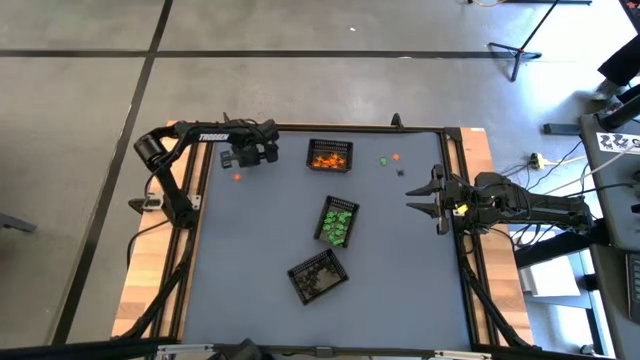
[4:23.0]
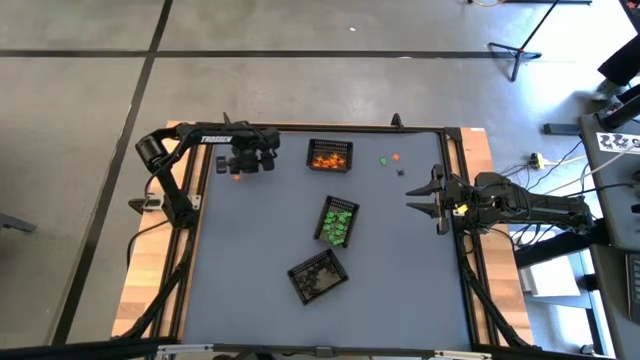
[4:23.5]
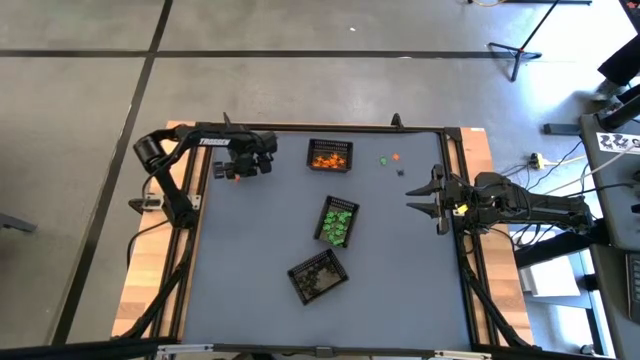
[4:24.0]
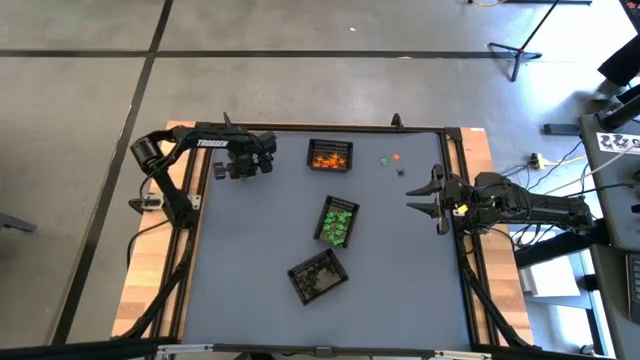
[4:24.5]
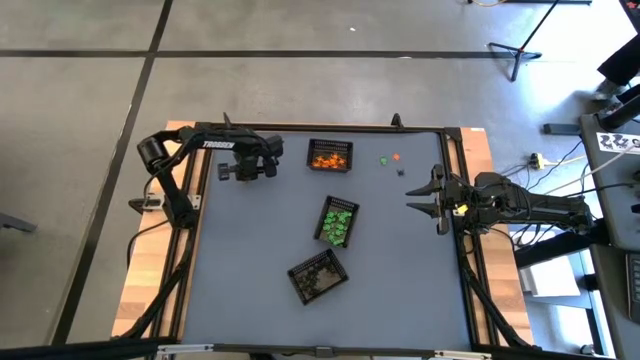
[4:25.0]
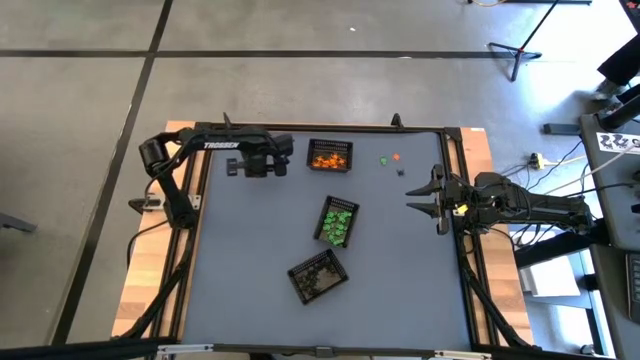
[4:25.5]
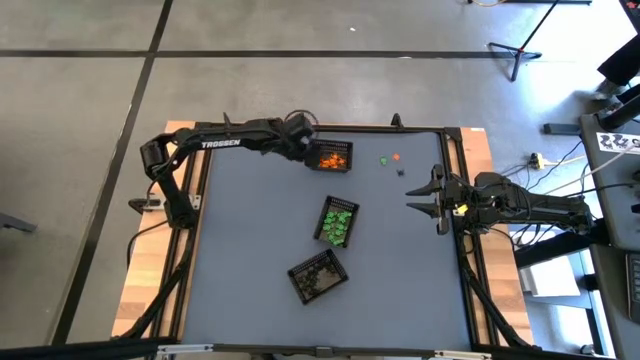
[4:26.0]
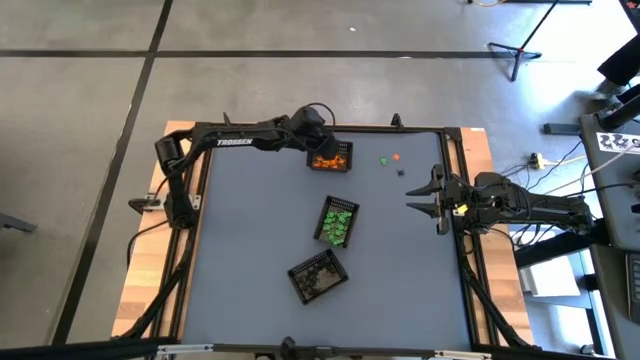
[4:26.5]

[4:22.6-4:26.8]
Task: Sort Halloween decoration
Put the orange spider toy into the top black bin

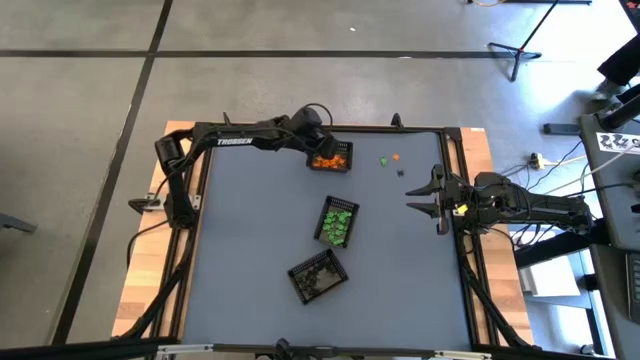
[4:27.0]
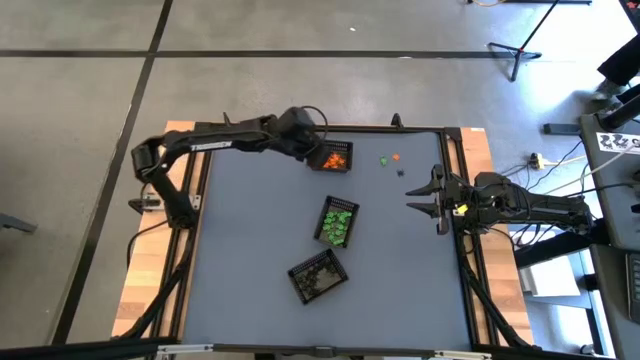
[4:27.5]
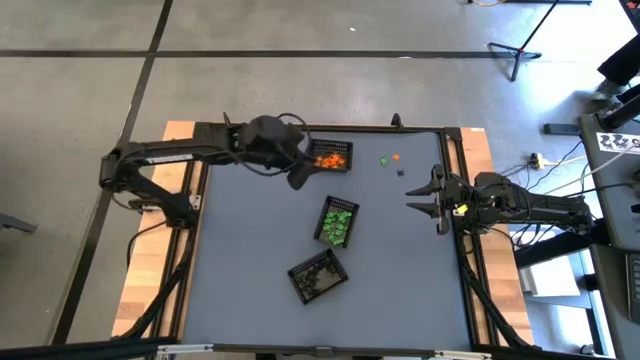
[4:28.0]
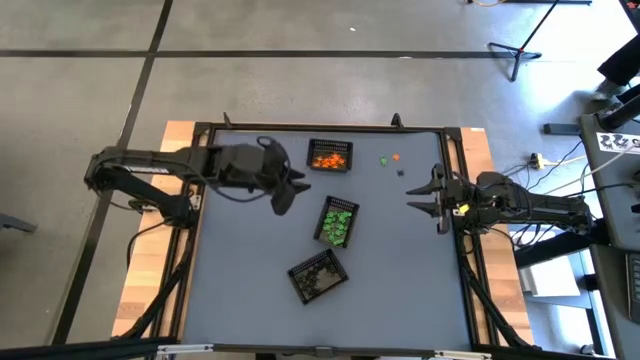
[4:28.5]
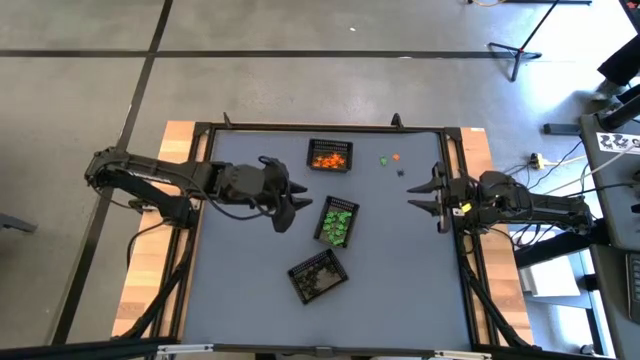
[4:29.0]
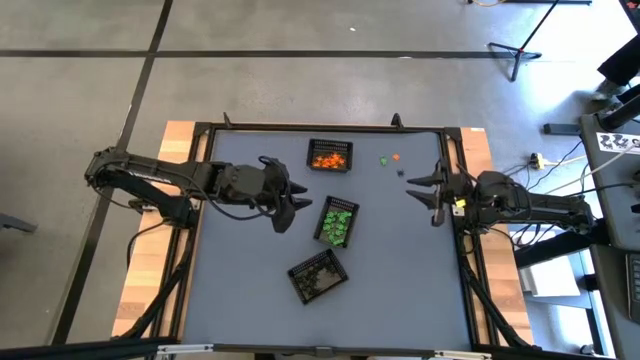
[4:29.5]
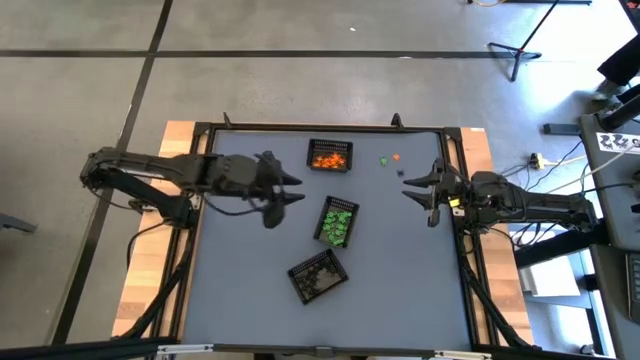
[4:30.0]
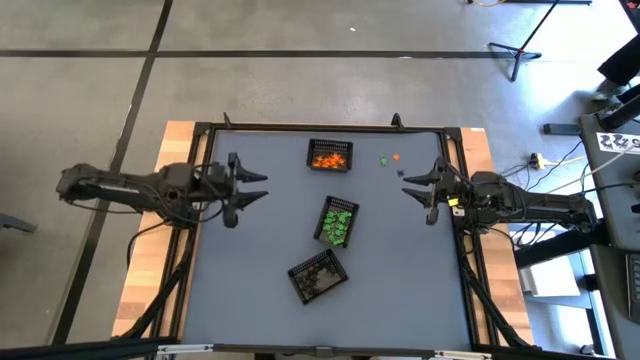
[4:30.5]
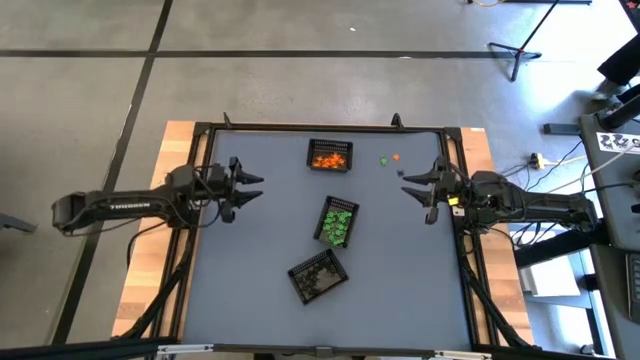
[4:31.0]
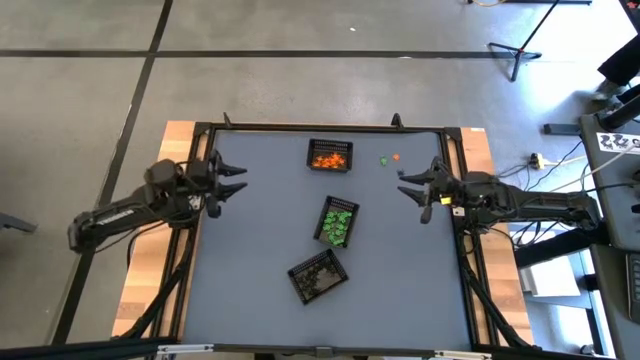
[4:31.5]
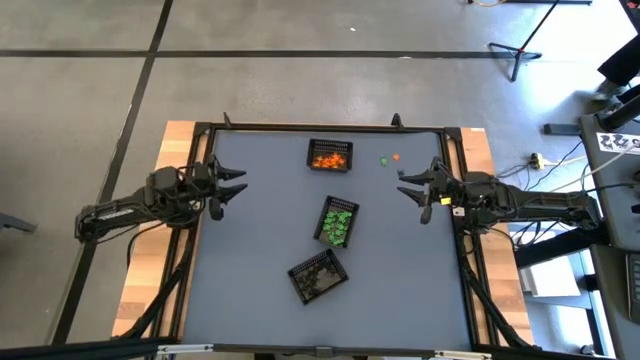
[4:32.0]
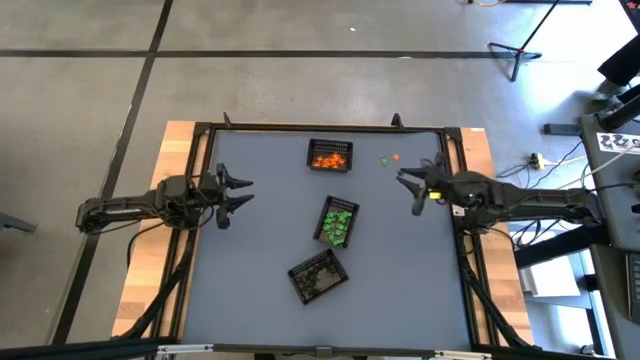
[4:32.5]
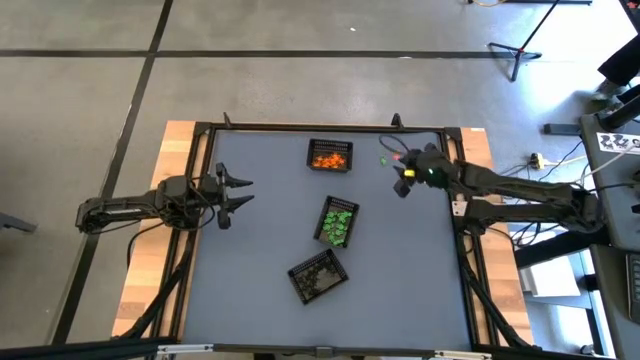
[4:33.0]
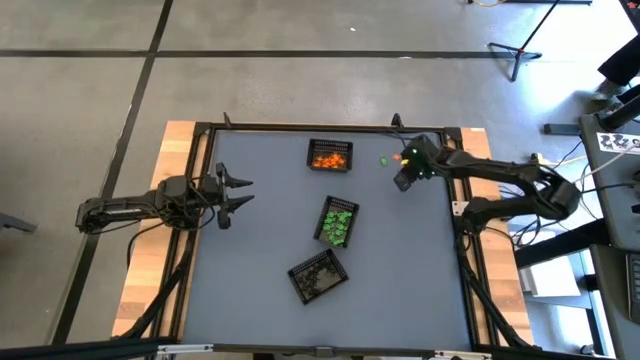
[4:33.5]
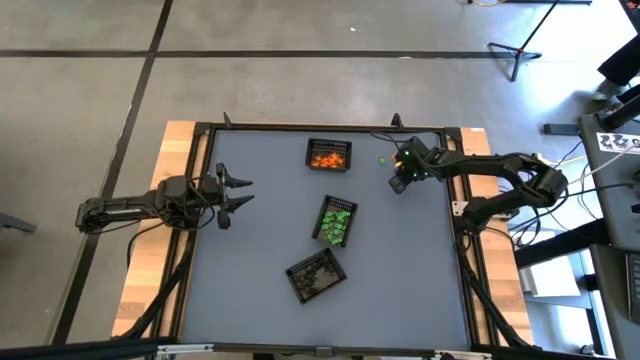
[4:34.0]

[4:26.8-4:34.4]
Put the black spider toy into the bottom black bin

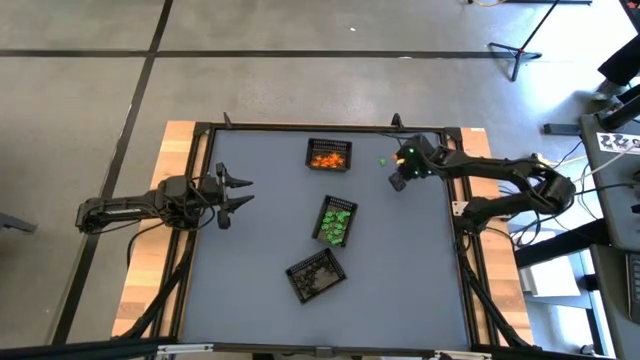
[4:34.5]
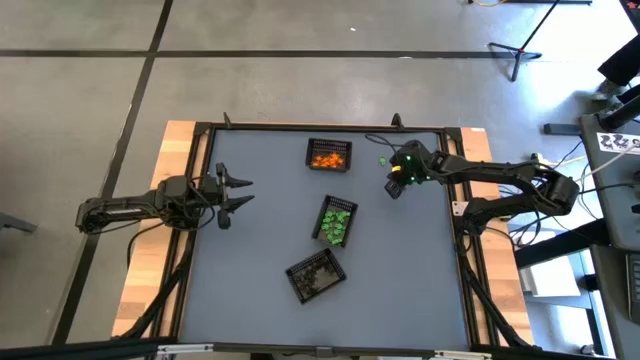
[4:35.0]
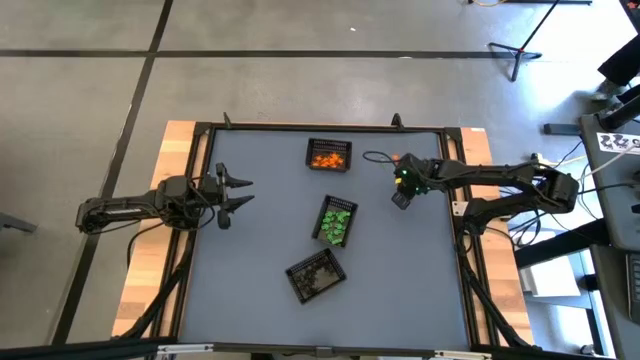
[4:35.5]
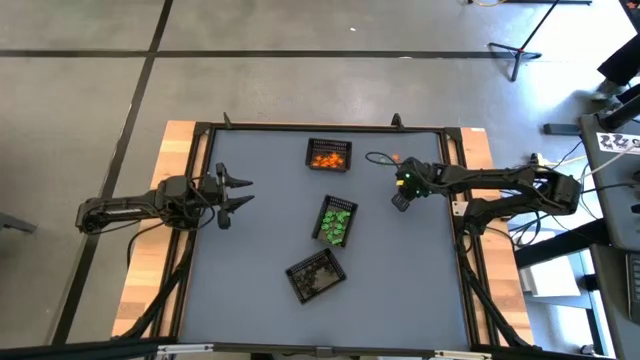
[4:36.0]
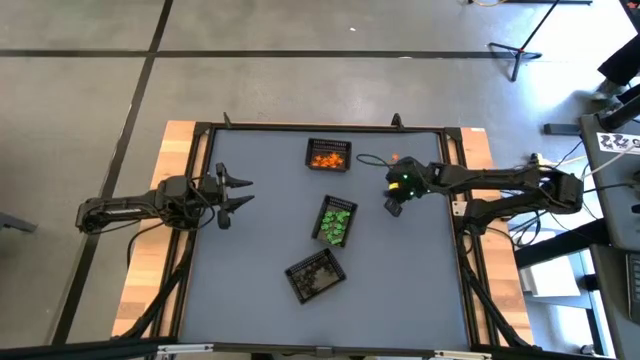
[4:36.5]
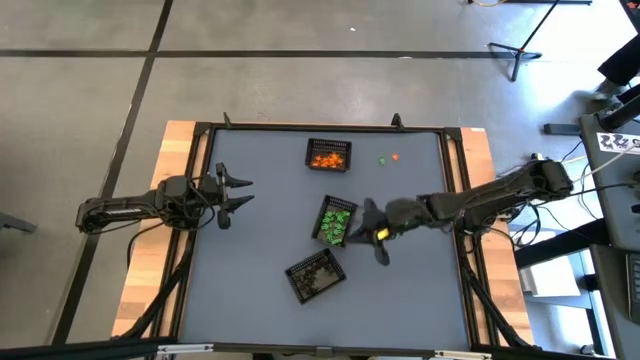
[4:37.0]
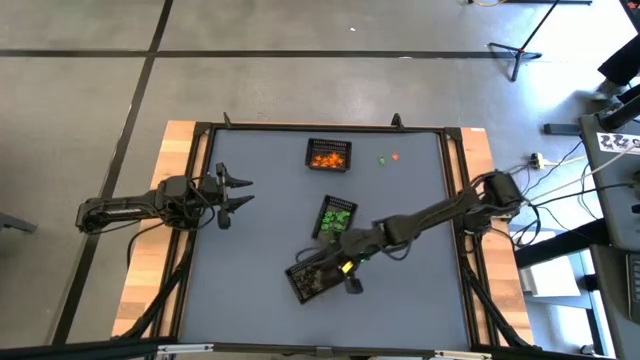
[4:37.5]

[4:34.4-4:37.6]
Put the black spider toy into the bottom black bin

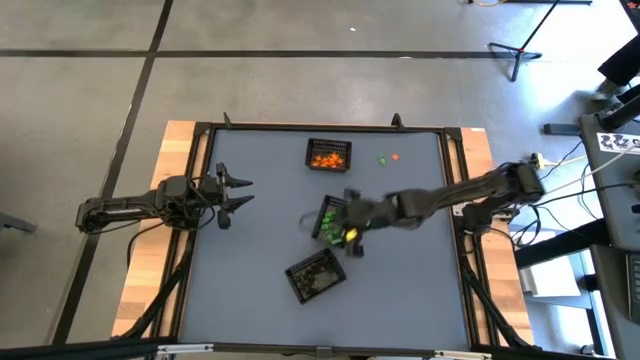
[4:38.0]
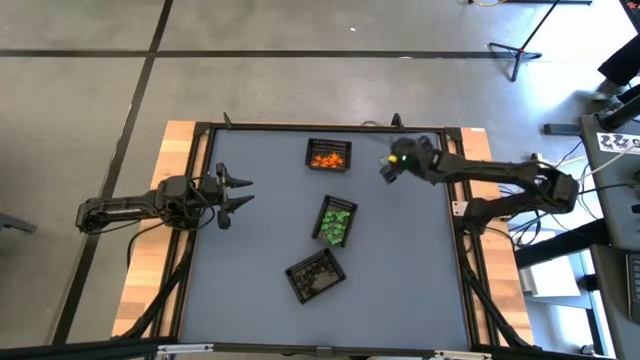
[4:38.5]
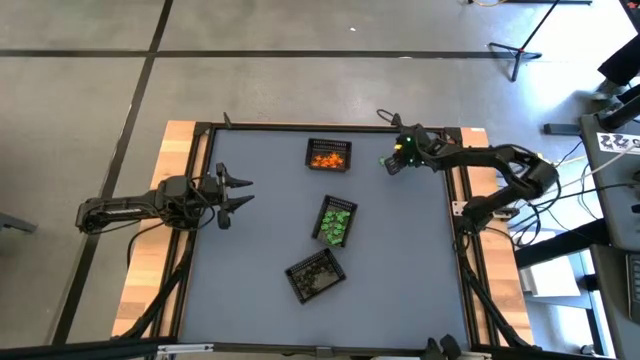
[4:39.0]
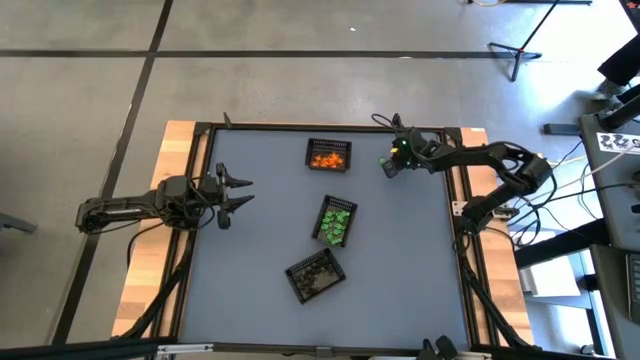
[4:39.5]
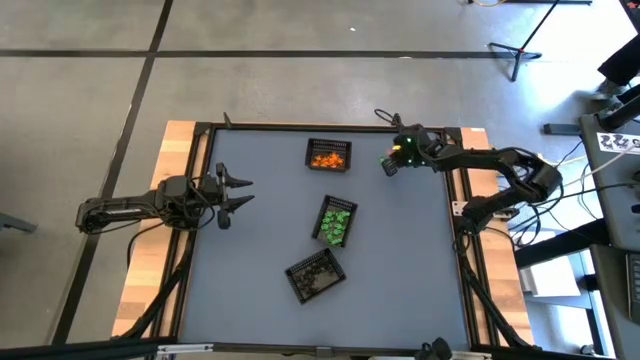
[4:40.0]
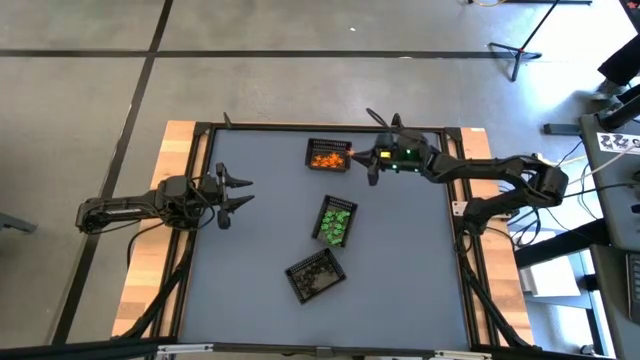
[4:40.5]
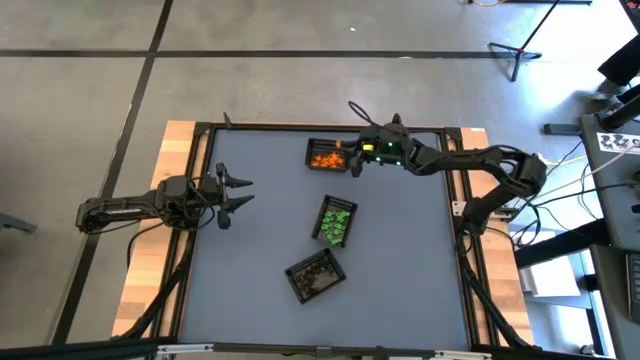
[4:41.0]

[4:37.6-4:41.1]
Put the orange spider toy into the top black bin

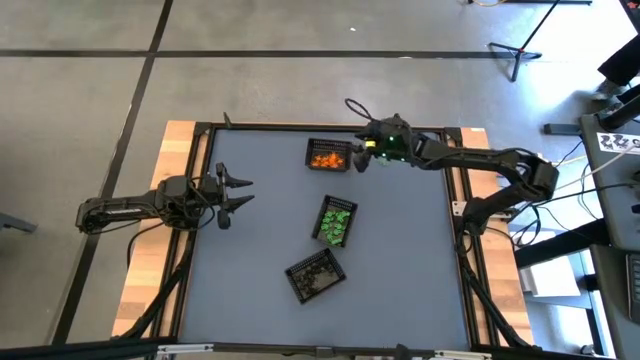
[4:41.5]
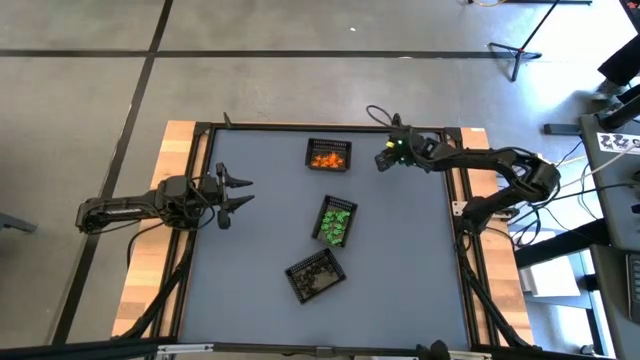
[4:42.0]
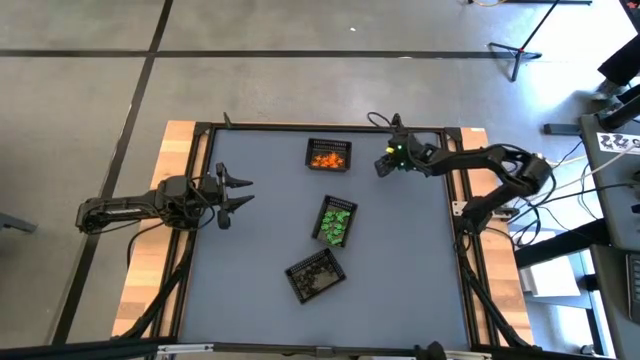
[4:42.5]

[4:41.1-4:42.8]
Put the green skeleton toy into the center black bin

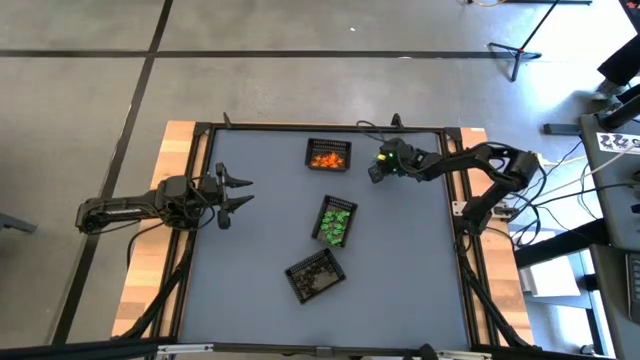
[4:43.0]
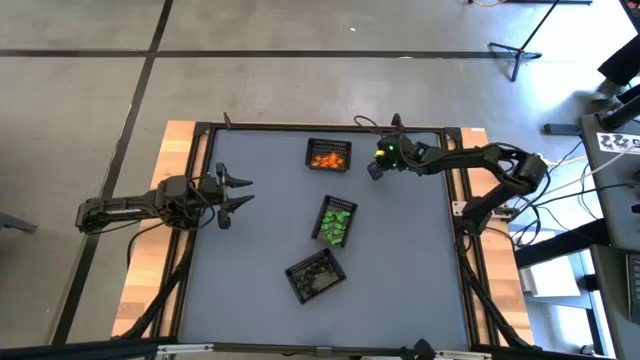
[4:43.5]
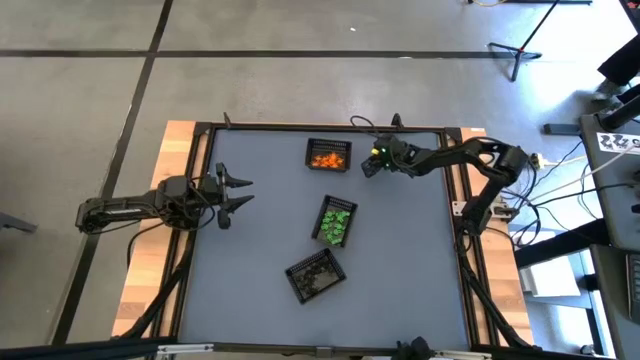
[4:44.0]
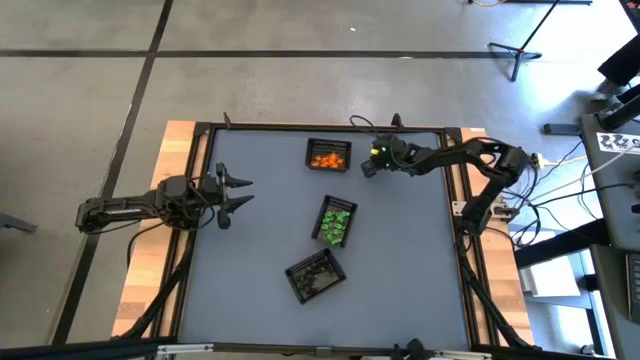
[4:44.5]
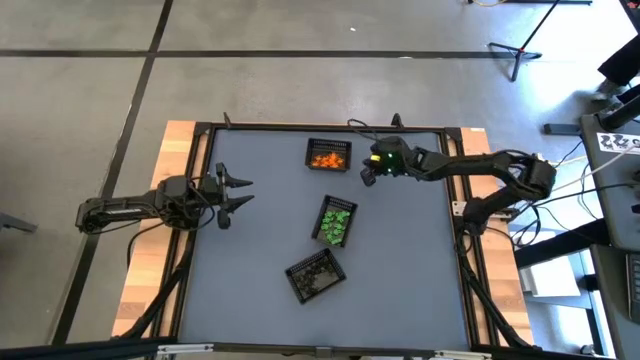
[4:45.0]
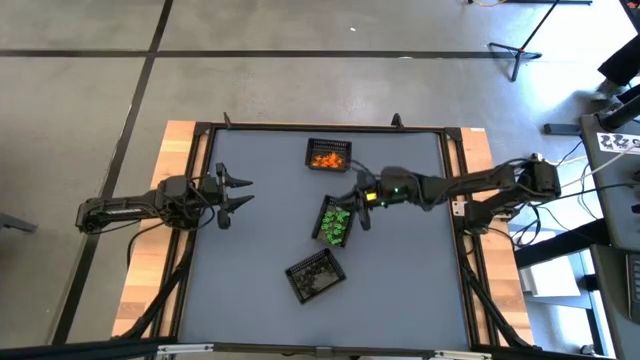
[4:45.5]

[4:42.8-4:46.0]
Put the green skeleton toy into the center black bin
